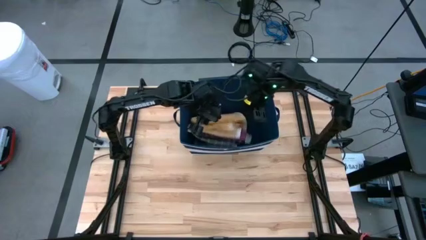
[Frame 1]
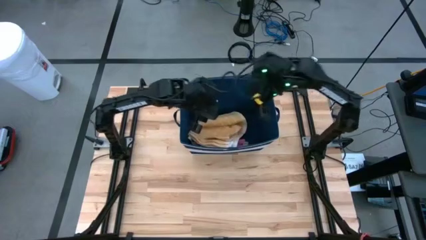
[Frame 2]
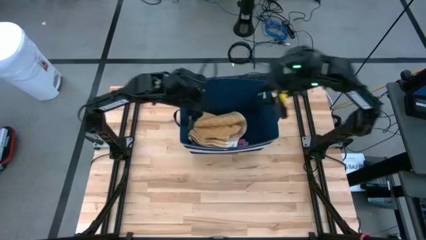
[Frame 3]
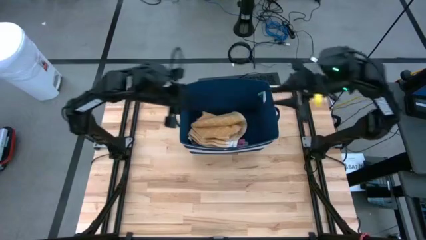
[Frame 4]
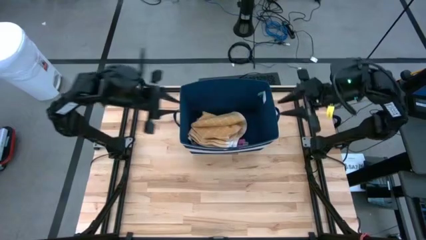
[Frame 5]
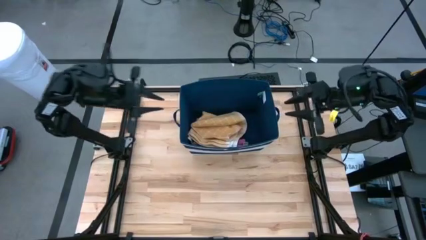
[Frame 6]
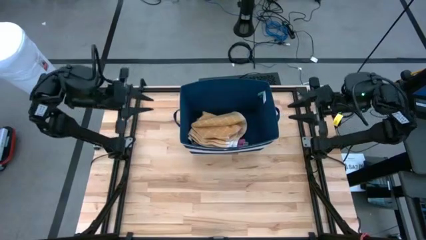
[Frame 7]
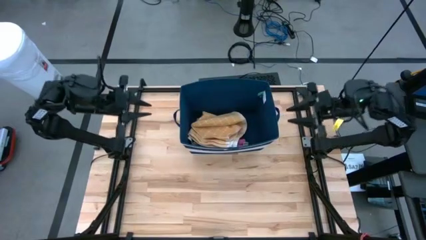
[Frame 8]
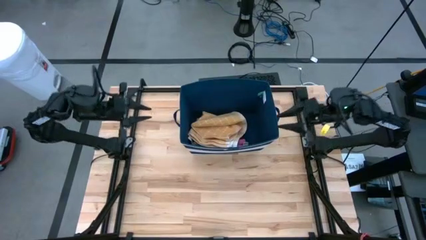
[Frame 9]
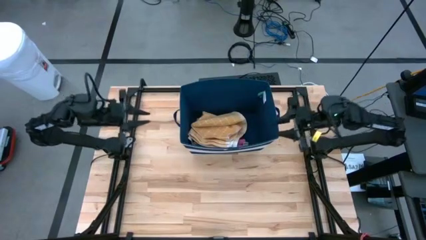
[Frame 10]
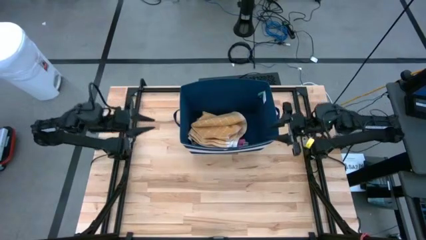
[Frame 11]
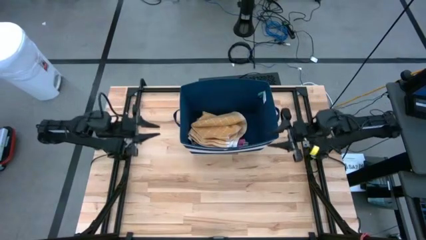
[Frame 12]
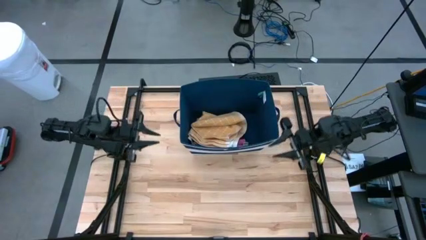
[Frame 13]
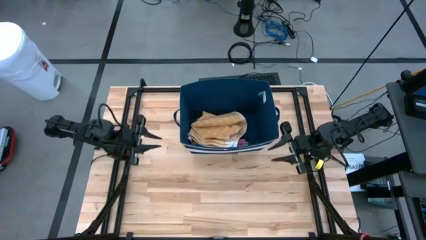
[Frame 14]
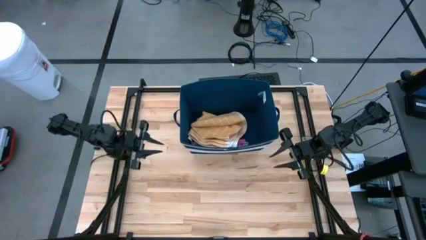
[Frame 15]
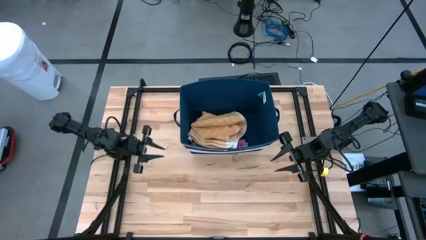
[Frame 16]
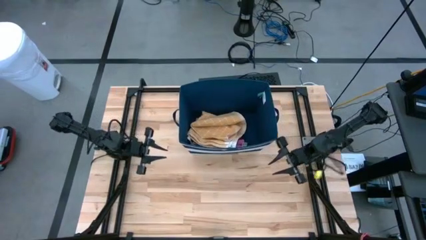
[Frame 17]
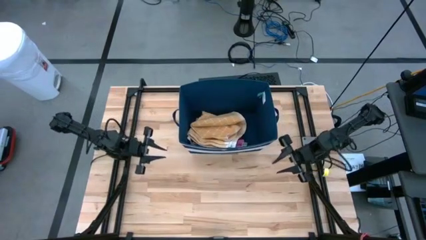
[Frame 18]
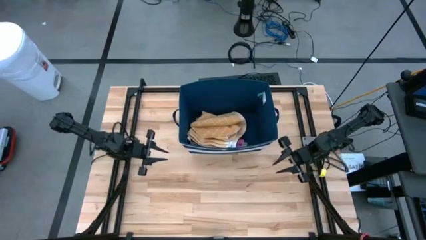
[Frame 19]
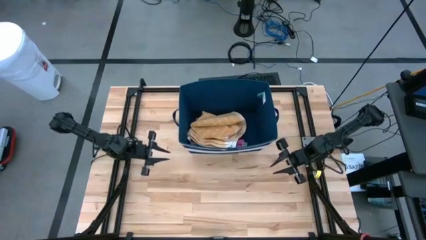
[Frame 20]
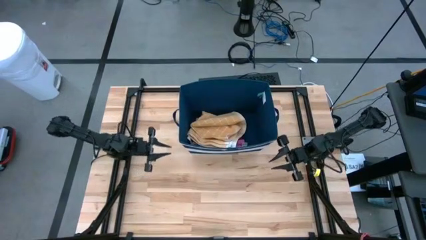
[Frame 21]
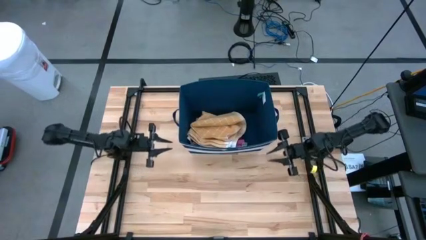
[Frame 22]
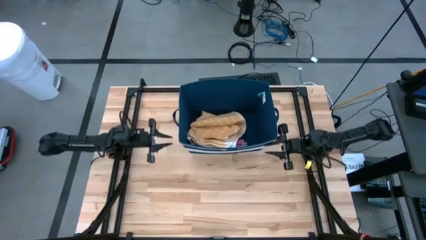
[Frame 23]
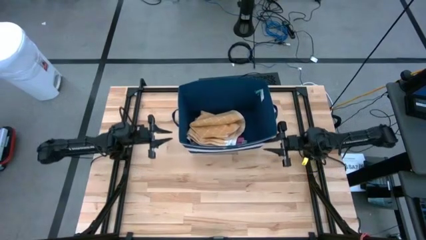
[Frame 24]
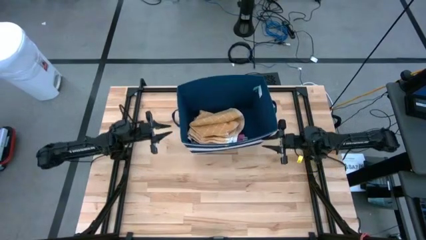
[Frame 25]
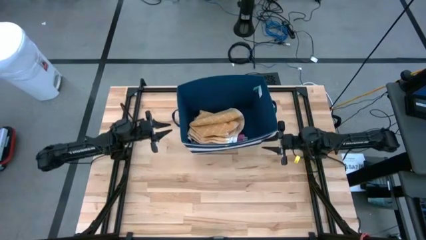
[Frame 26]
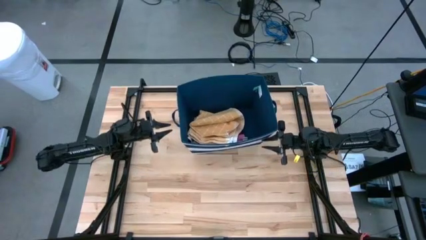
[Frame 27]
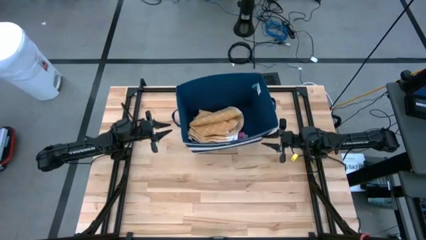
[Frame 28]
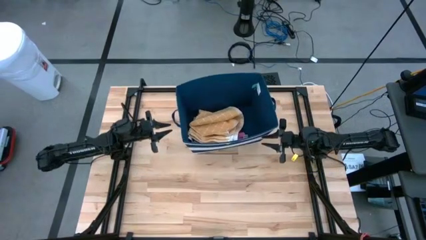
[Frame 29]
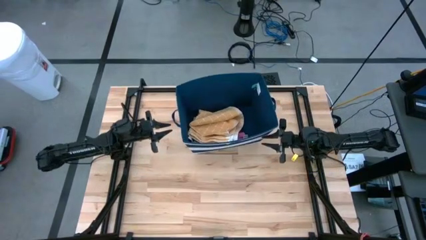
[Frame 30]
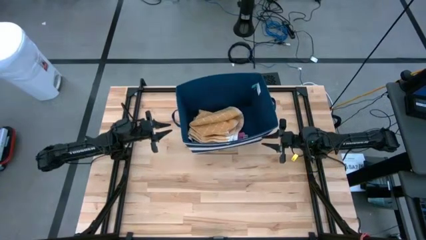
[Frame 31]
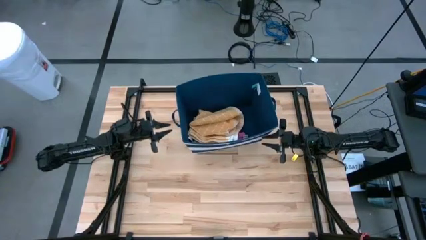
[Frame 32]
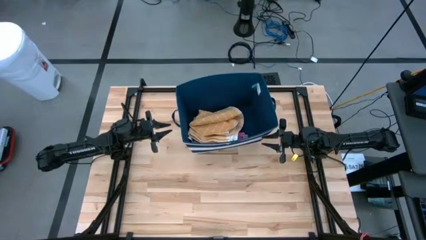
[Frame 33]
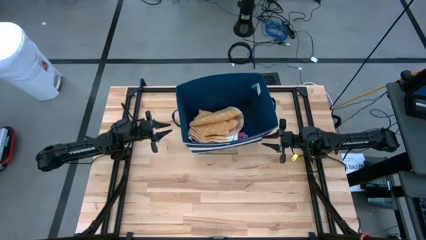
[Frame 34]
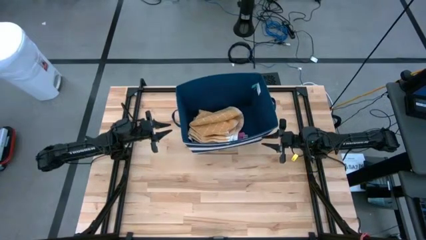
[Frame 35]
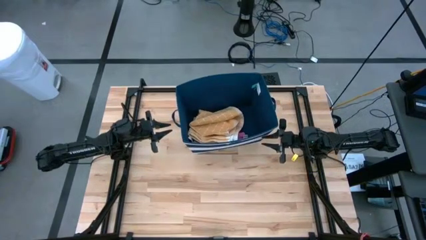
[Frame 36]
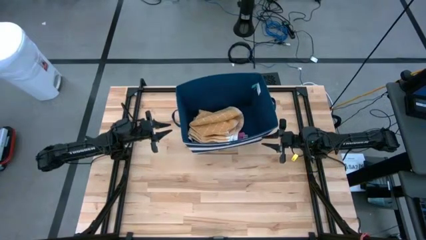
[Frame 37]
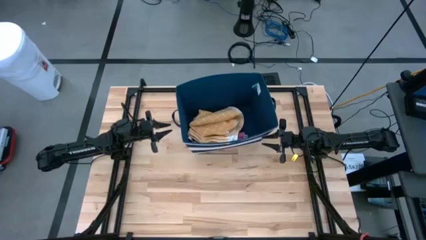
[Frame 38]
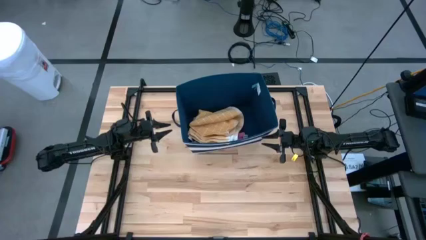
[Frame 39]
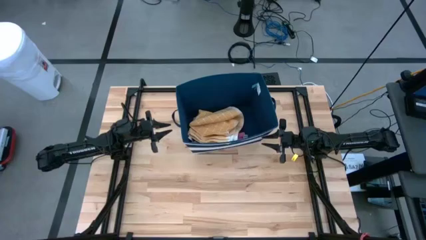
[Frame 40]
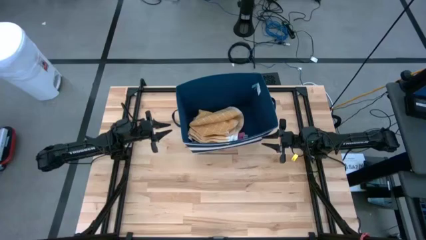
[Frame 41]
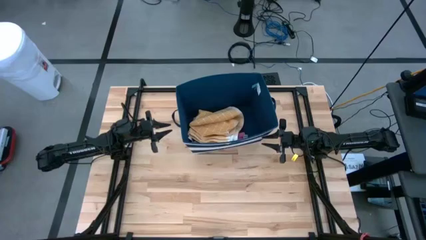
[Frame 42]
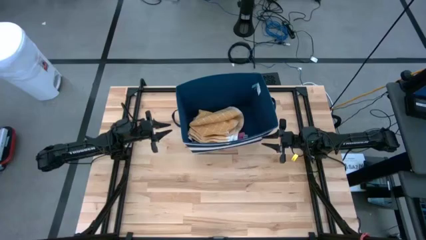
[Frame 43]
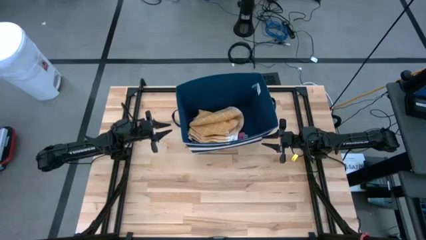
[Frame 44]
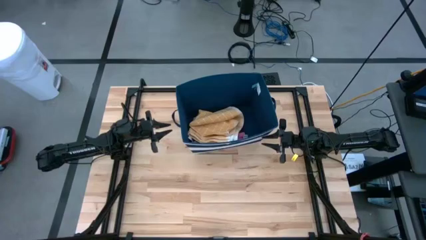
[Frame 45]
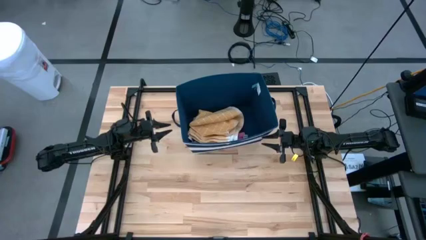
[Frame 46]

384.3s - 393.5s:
Task: Fold towel
Return to Home Position

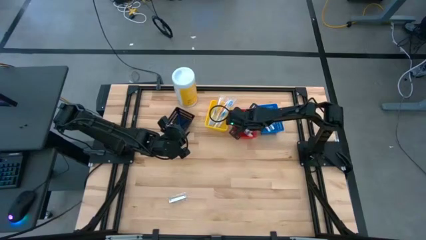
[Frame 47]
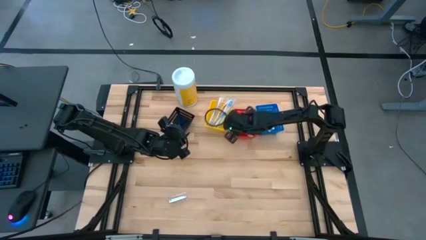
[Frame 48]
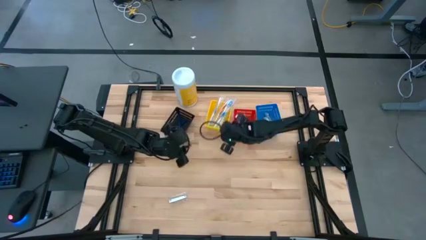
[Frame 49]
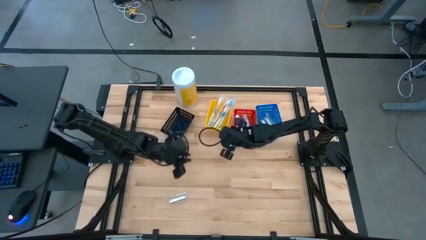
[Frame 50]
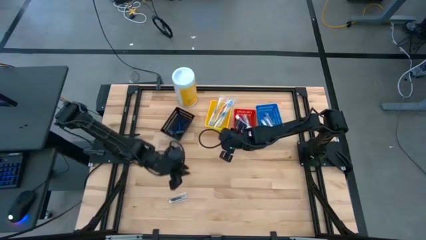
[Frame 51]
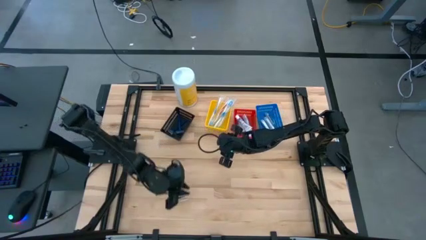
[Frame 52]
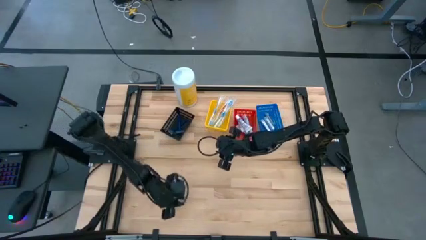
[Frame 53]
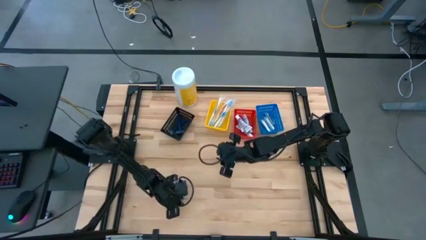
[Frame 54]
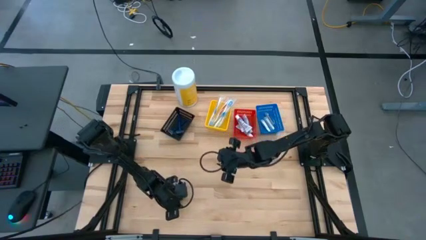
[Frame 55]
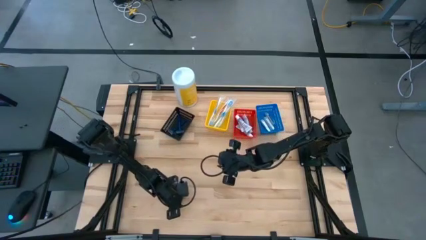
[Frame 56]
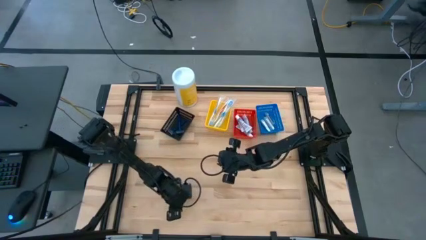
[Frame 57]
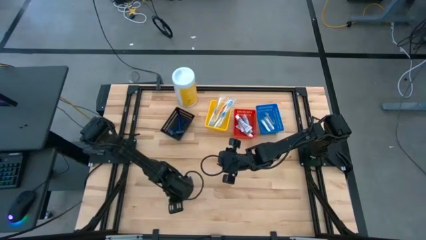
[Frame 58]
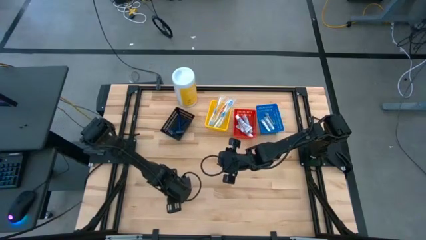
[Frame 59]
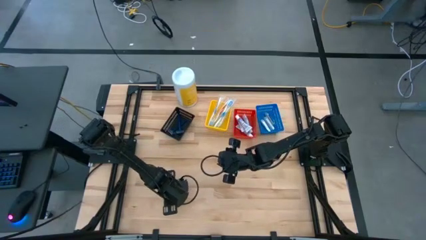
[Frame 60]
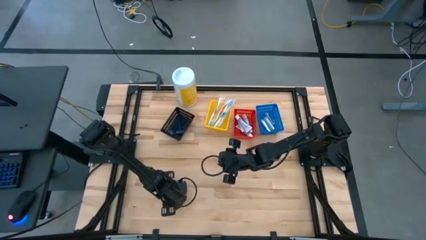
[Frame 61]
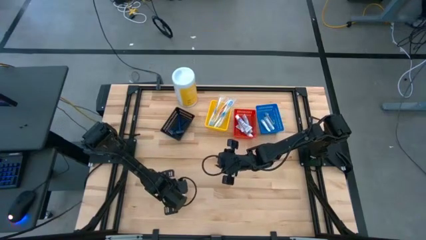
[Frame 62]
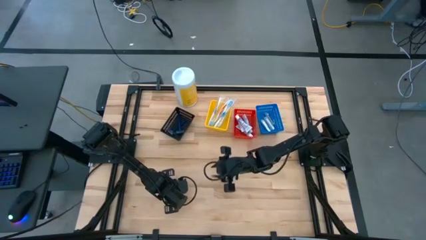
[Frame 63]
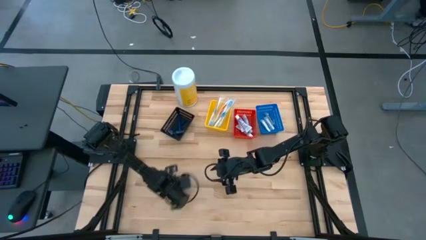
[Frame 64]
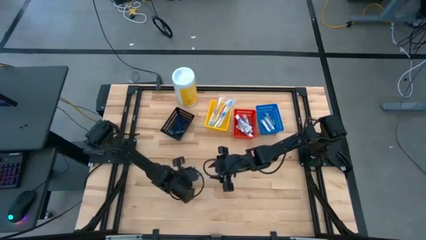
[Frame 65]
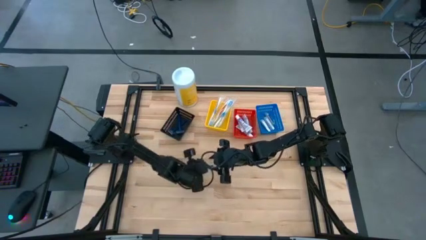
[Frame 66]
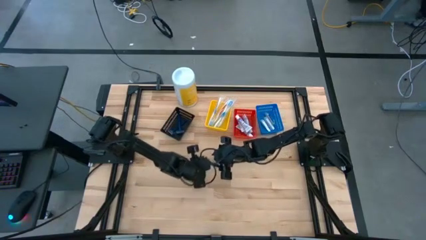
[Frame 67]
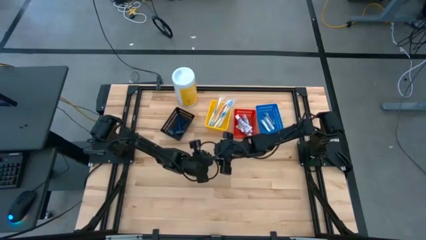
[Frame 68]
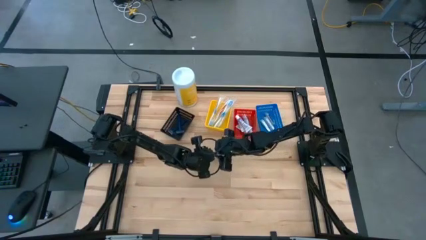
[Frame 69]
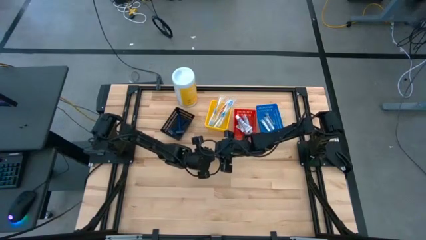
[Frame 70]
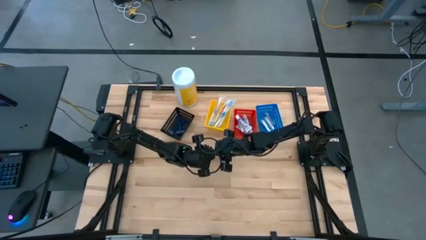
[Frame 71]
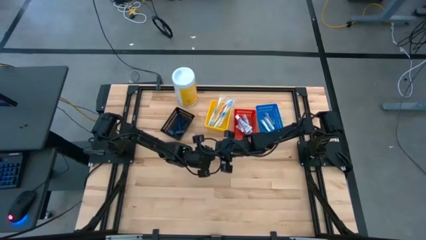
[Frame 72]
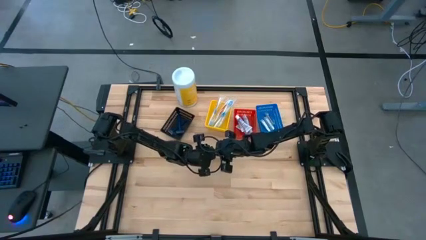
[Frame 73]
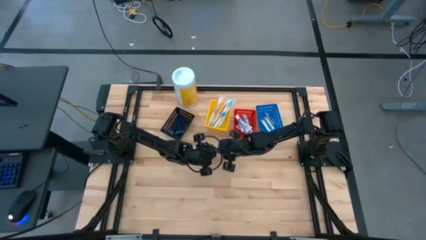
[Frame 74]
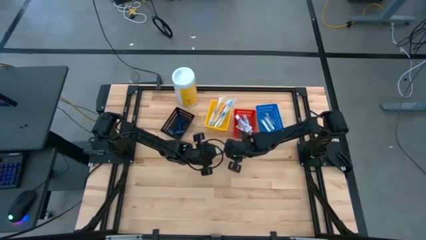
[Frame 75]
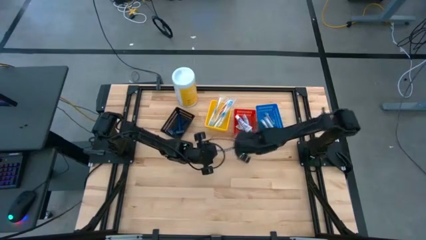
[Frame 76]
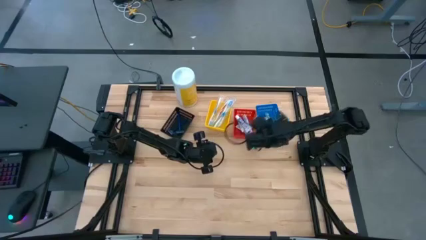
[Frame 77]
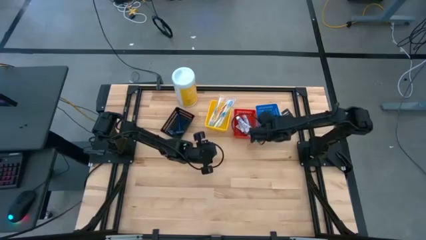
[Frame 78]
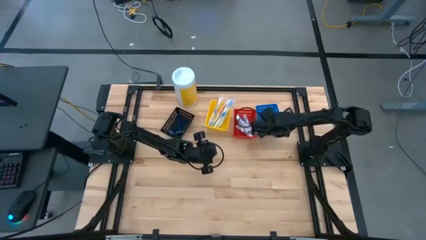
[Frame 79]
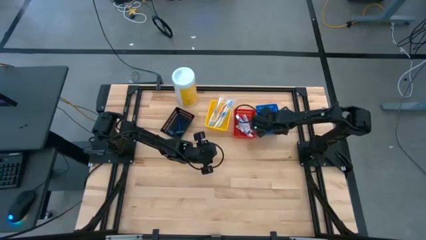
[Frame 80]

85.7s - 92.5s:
Task: Pick & Place Travel size toiletries
Put the silver nail cutter into the blue bin
